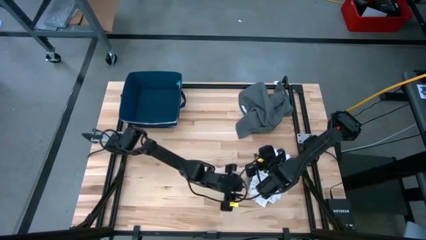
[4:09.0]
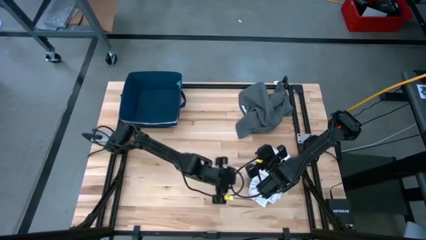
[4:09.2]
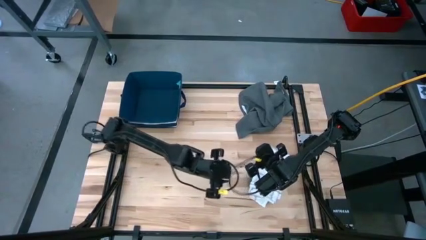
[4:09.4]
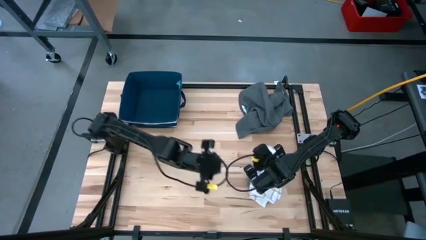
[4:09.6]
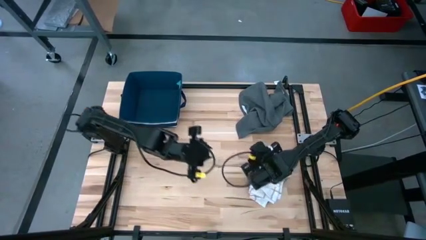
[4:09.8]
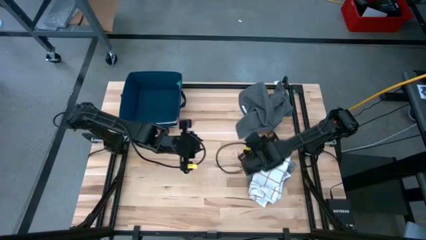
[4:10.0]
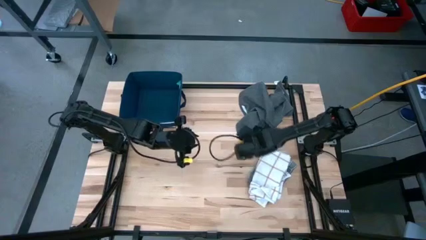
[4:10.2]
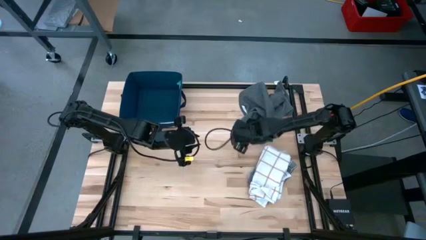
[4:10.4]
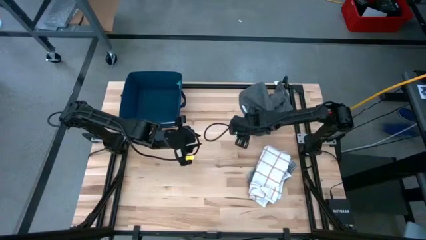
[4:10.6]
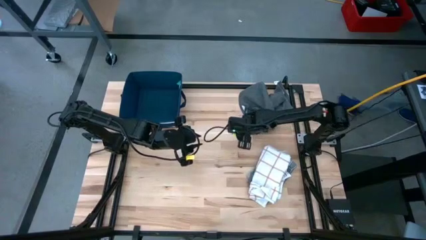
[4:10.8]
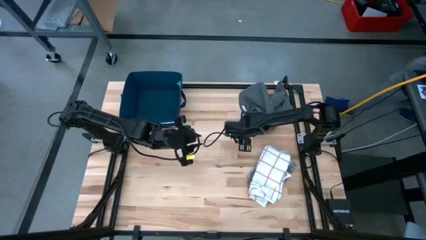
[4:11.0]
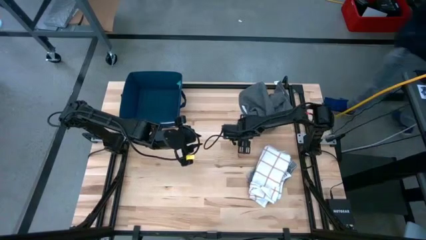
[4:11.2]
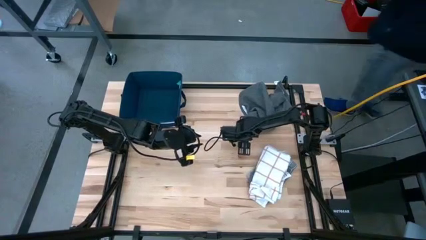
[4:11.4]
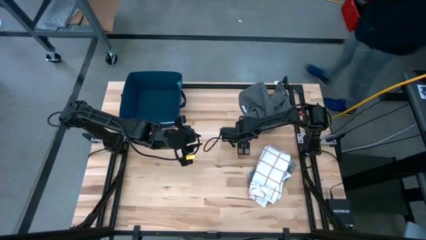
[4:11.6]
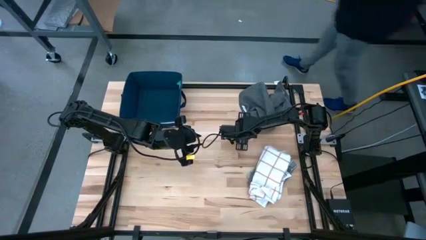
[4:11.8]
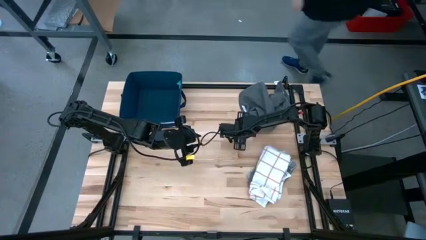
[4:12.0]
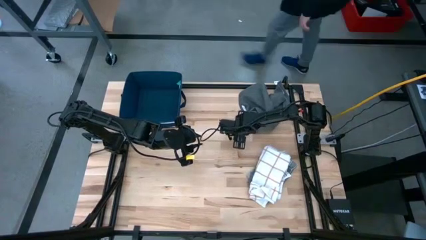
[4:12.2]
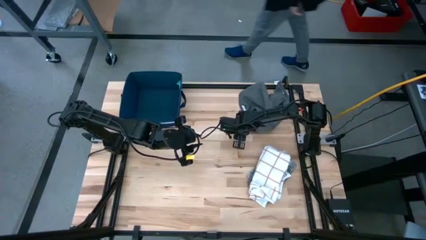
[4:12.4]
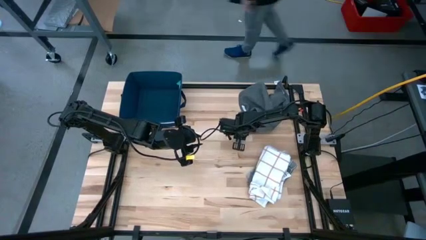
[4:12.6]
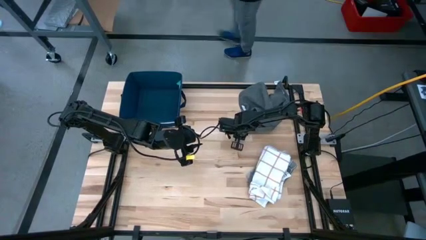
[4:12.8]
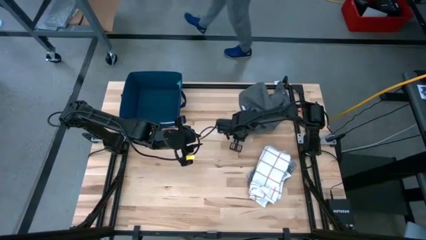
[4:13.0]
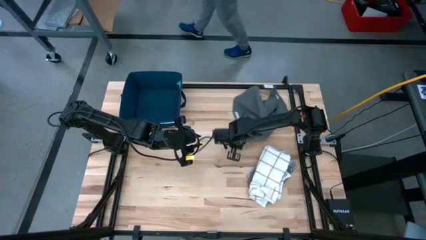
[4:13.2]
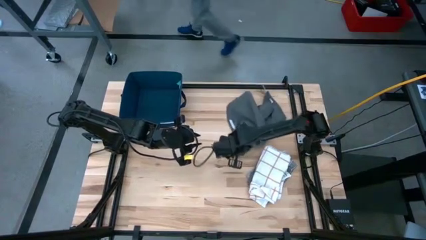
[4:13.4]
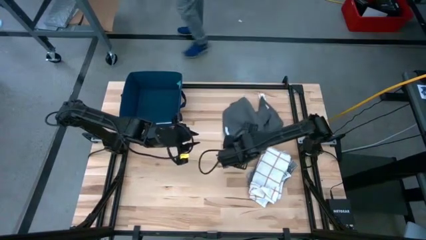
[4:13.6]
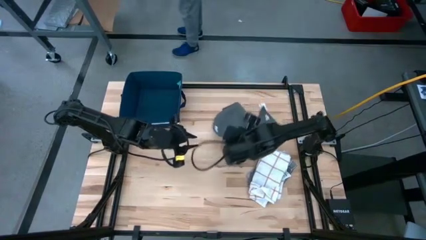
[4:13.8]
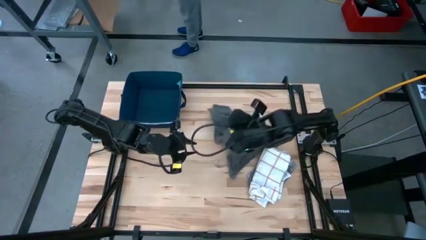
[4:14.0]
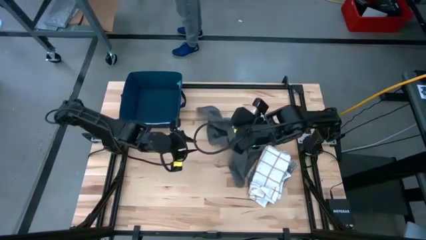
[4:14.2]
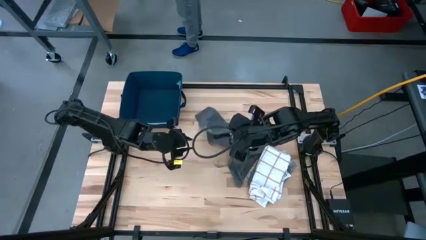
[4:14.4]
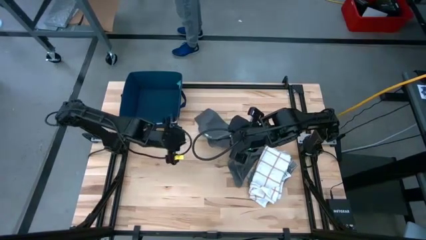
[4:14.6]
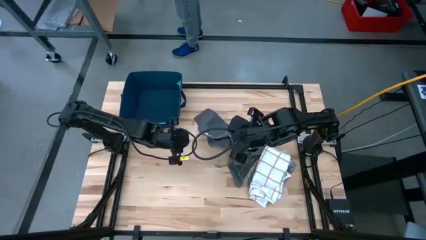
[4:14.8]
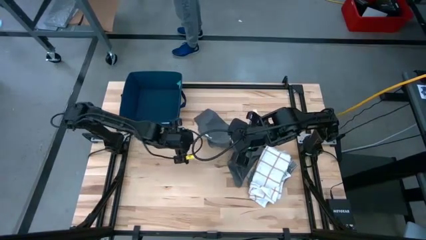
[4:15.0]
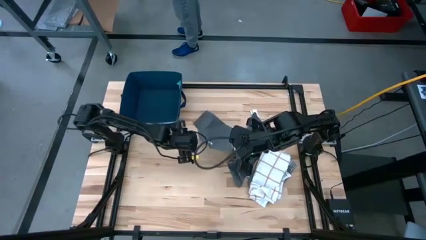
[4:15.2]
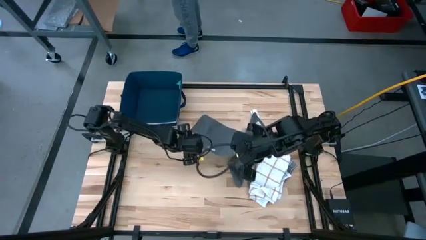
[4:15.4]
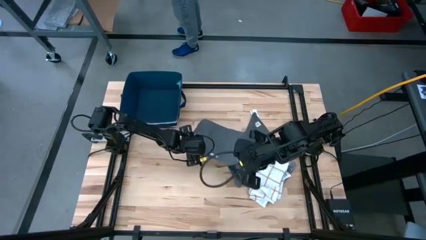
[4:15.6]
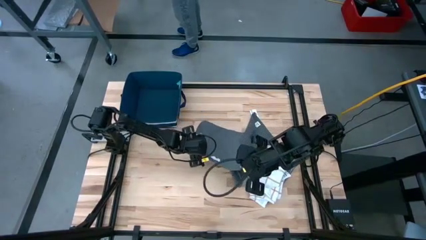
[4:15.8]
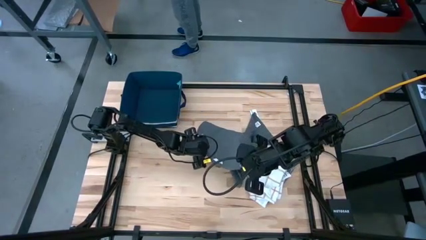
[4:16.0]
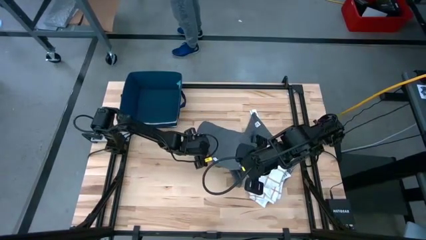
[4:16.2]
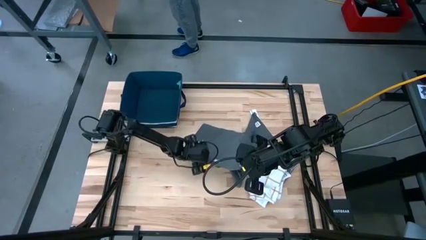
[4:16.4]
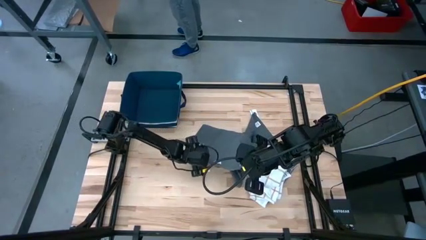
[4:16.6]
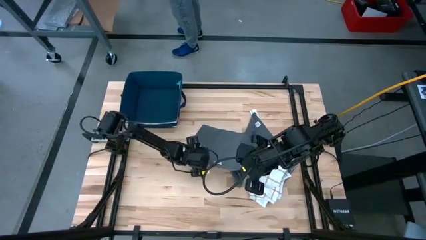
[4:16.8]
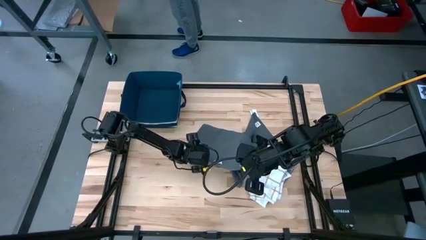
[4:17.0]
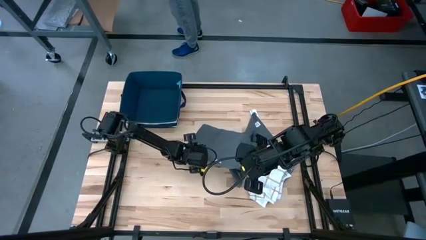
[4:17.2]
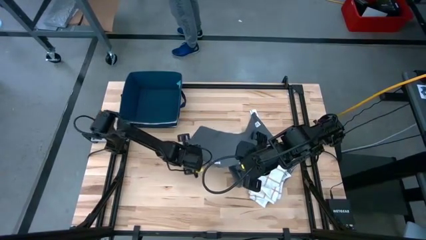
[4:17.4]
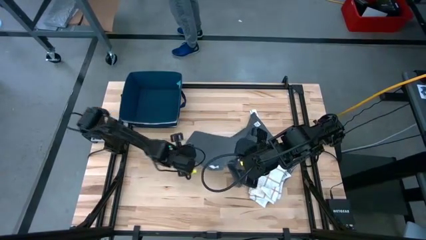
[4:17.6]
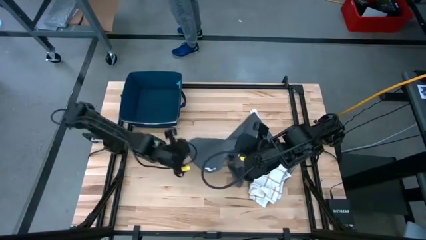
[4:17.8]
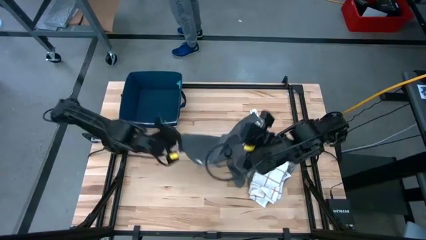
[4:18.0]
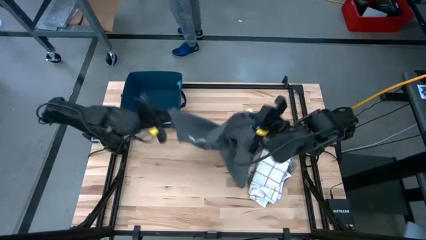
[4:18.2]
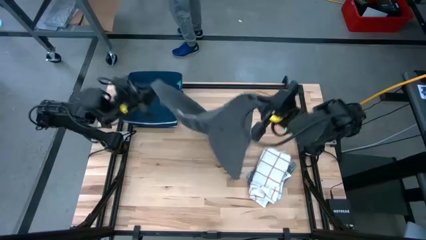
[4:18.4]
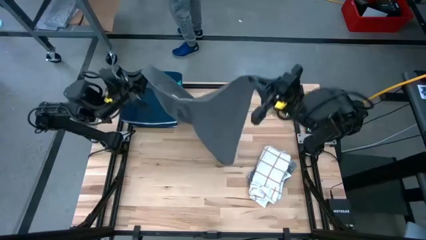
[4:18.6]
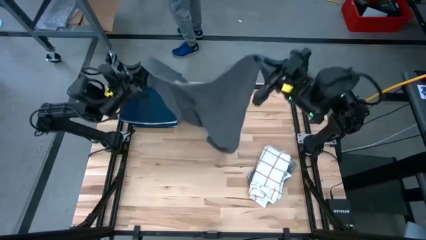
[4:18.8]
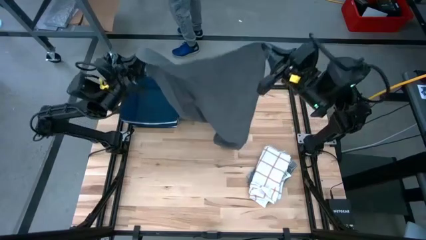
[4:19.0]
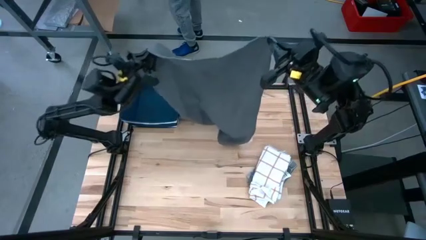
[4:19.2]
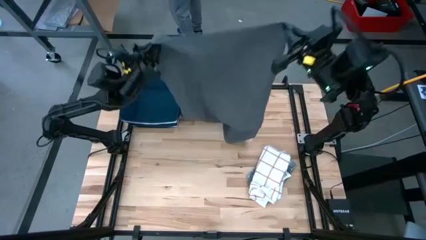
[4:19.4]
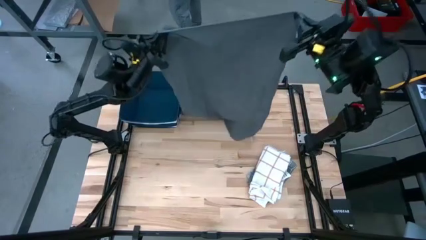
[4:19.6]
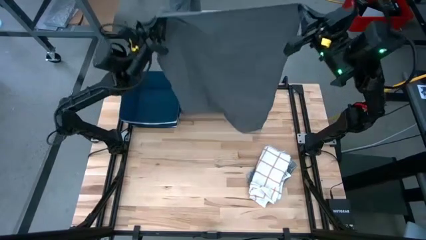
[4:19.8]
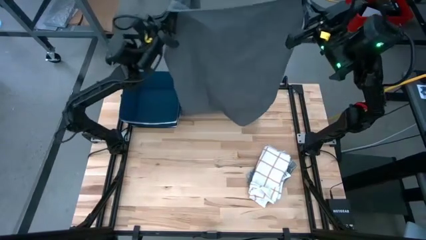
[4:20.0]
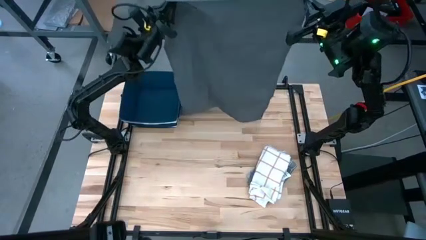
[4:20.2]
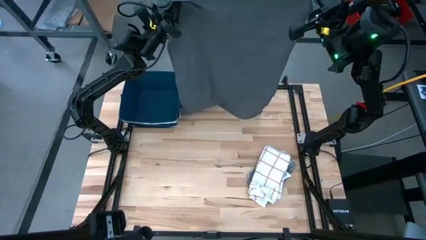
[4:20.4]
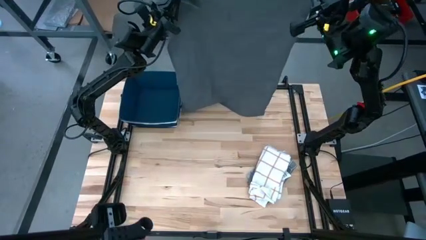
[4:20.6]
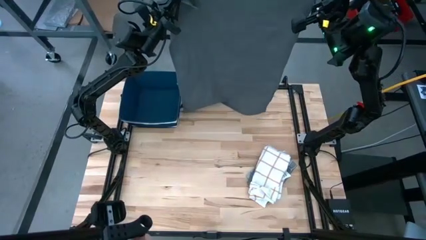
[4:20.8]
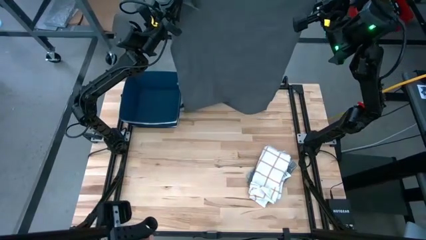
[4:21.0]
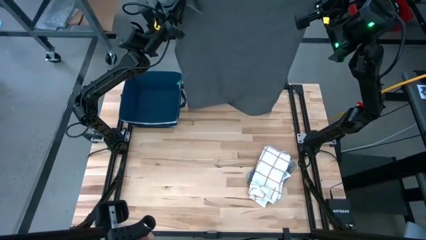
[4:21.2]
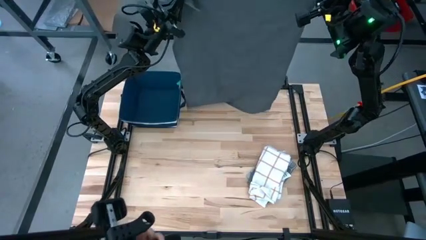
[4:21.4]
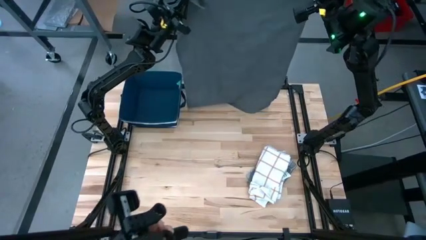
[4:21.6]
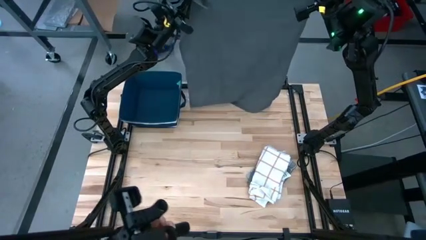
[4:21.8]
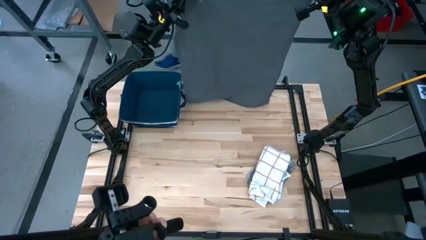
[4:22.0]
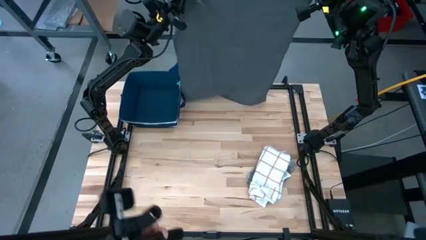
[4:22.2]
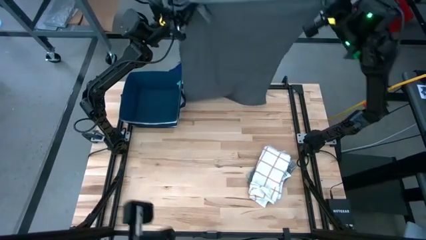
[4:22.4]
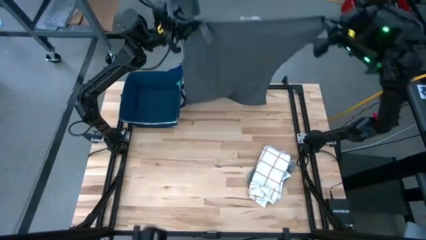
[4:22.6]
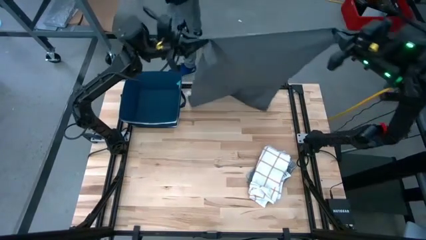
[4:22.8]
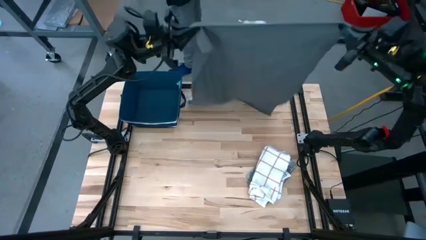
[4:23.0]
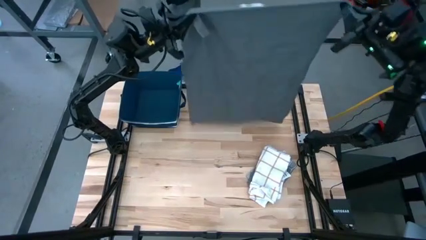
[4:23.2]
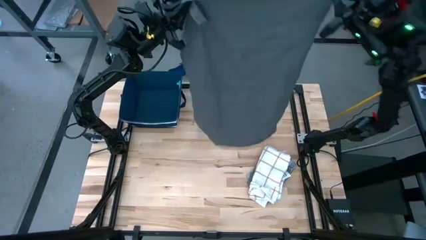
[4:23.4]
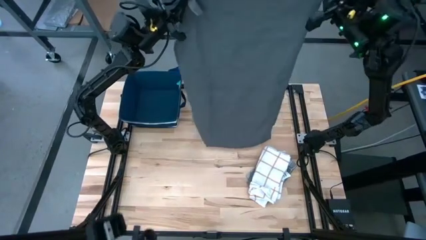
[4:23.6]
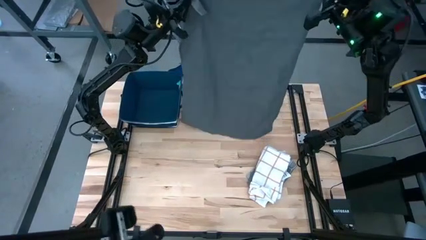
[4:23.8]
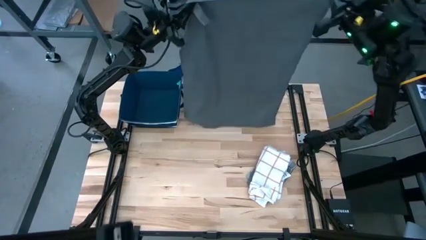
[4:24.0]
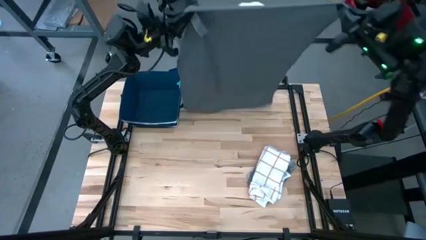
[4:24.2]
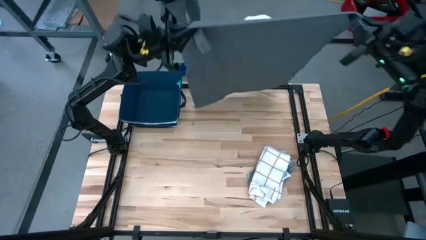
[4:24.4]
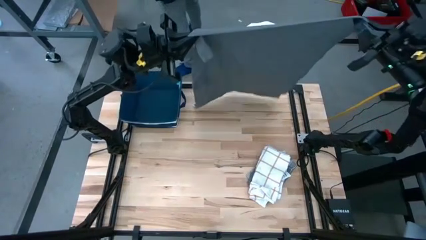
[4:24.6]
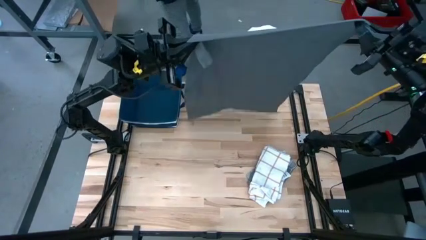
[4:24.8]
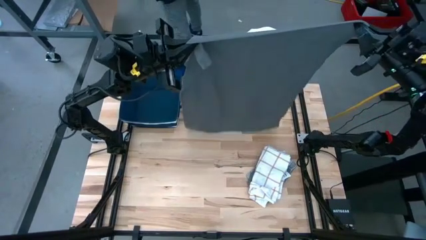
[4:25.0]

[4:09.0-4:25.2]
Task: Fold towel
Fold the gray towel
